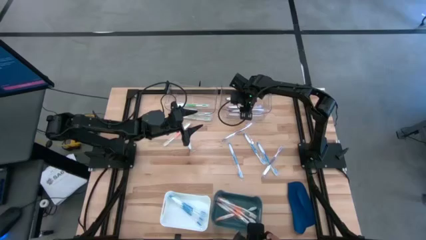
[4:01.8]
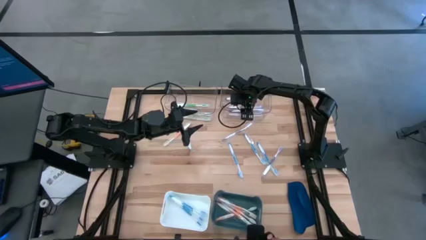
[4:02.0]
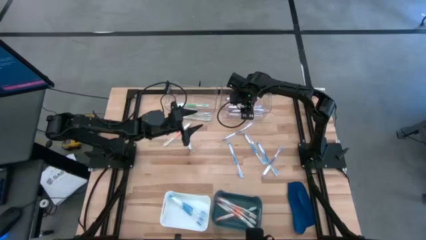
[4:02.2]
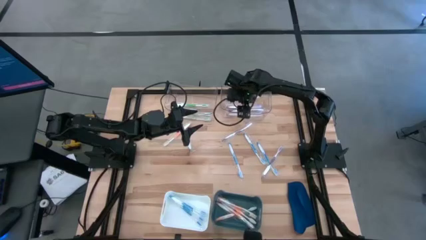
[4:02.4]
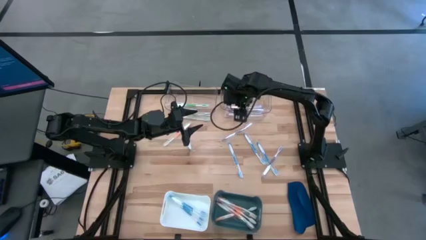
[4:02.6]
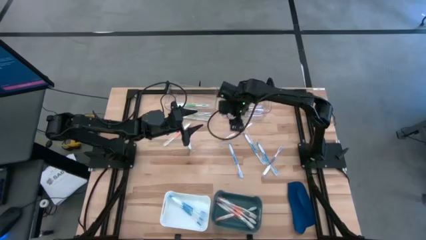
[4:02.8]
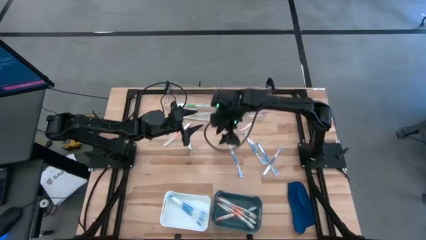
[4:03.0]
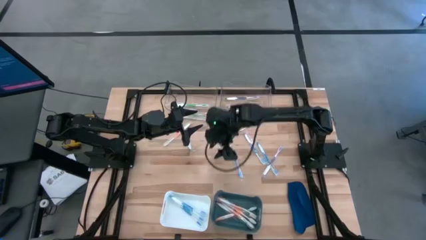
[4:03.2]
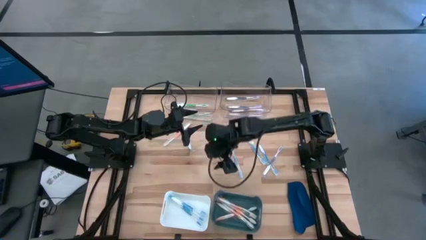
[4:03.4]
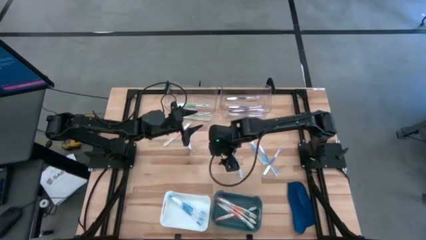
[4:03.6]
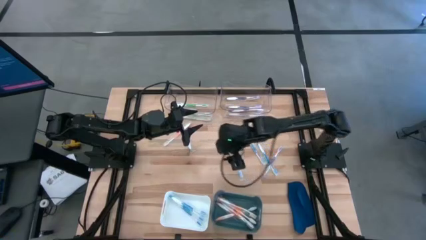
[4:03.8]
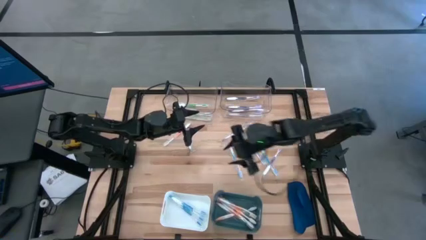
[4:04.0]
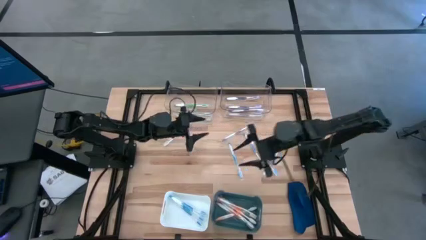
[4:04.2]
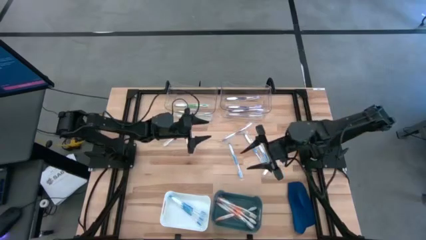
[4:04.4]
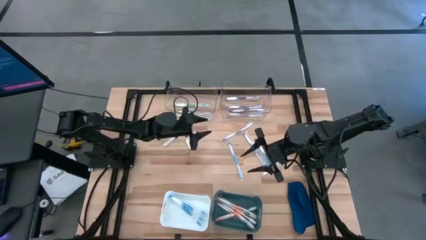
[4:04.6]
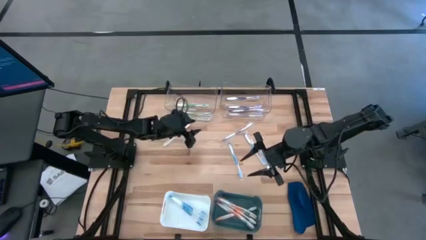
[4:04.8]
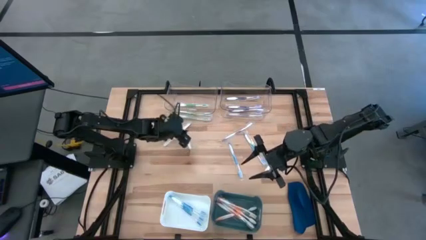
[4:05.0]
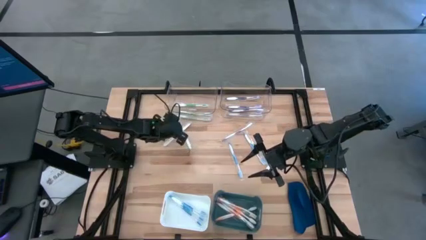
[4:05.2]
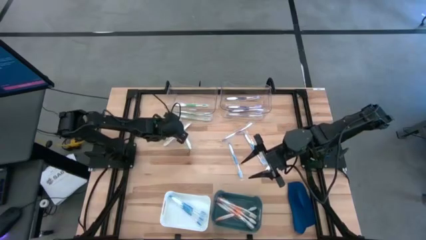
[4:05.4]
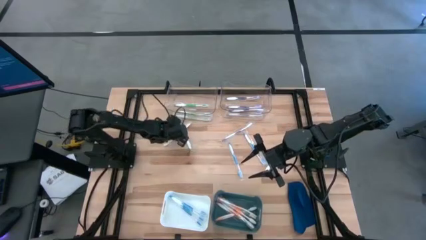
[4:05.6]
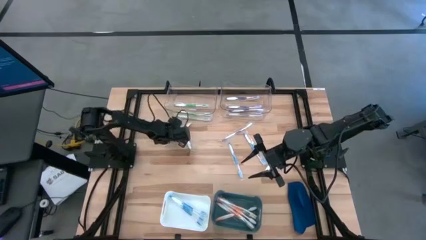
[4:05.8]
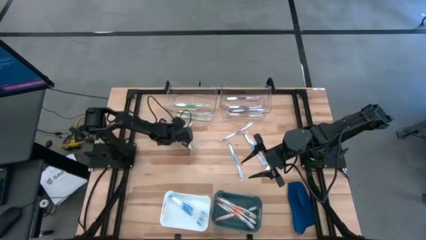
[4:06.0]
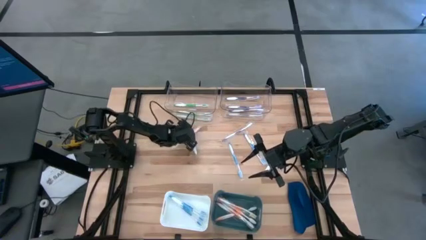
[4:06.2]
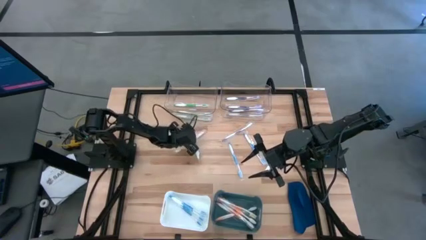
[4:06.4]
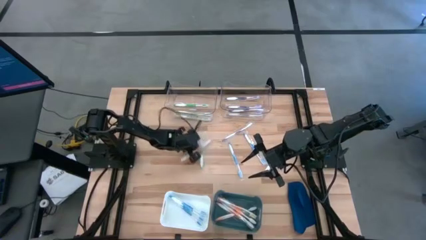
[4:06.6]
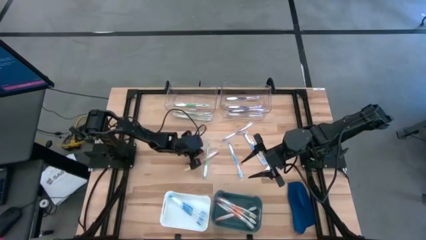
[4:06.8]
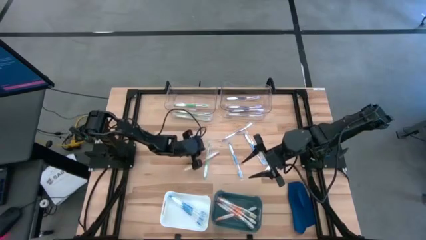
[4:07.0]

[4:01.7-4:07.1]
Task: Pick & Place Toothbrushes
Adjust the colored toothbrushes

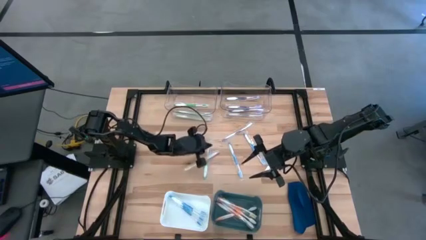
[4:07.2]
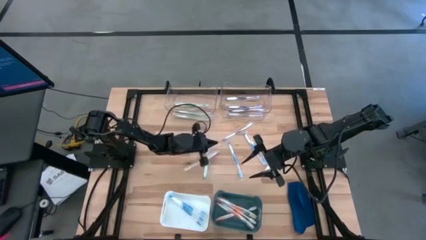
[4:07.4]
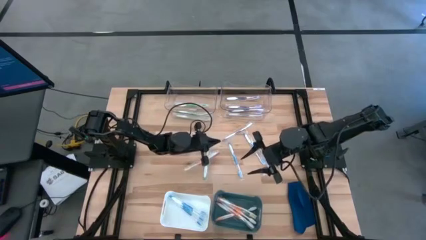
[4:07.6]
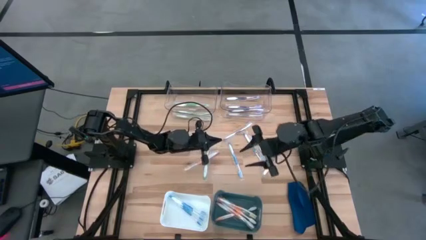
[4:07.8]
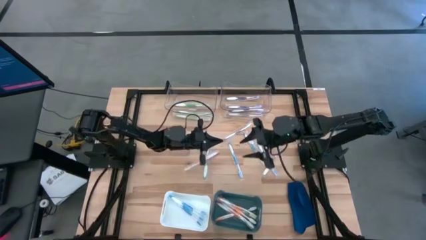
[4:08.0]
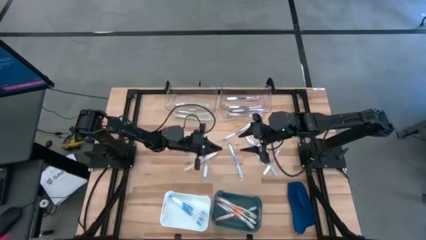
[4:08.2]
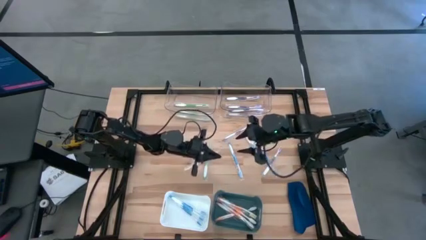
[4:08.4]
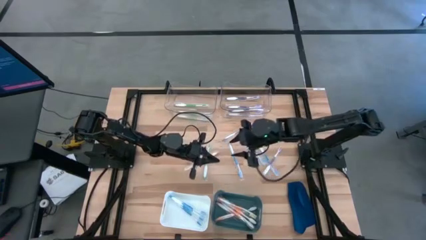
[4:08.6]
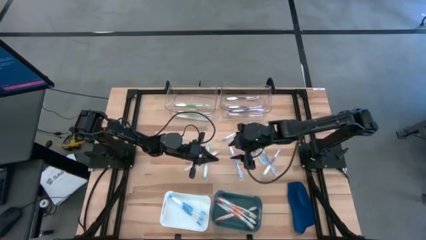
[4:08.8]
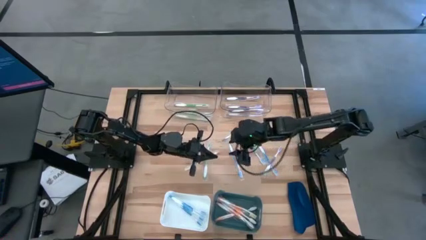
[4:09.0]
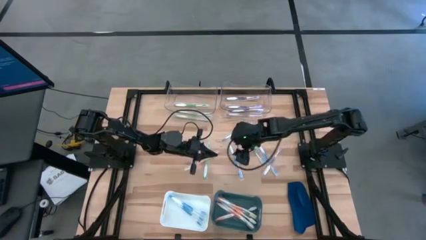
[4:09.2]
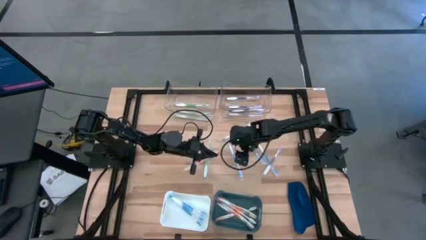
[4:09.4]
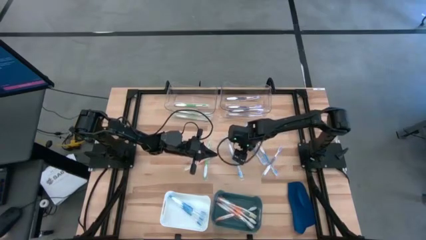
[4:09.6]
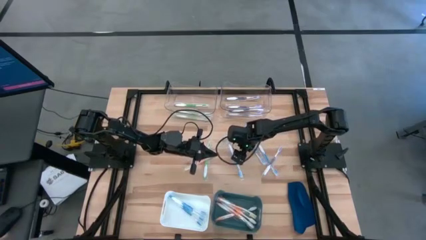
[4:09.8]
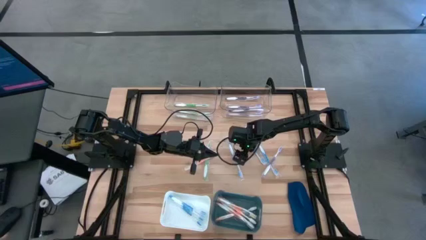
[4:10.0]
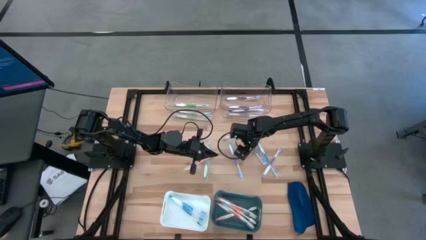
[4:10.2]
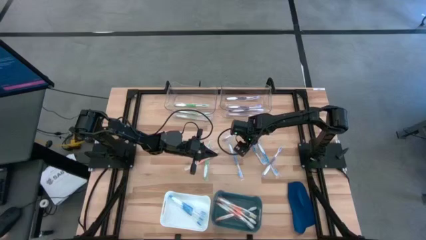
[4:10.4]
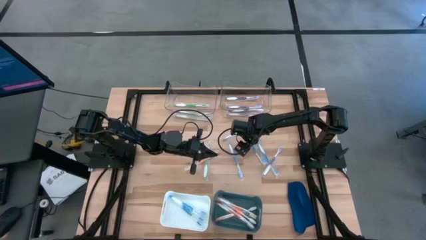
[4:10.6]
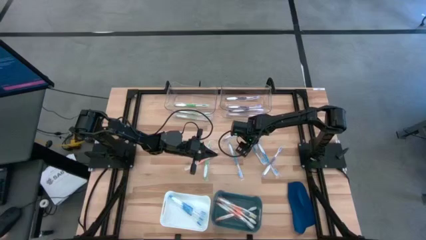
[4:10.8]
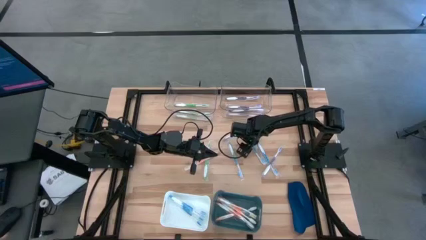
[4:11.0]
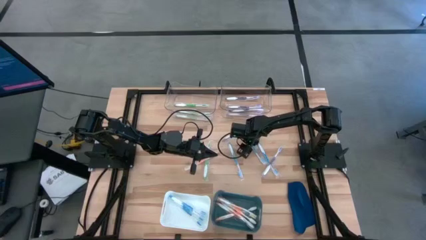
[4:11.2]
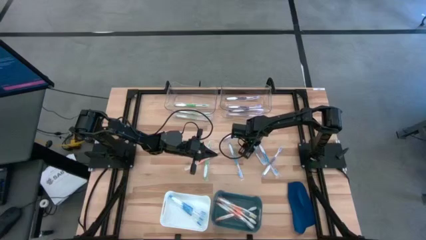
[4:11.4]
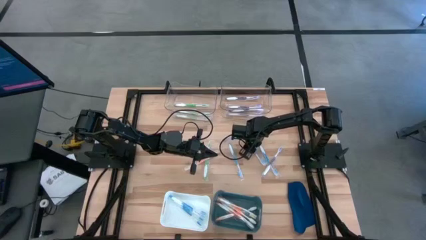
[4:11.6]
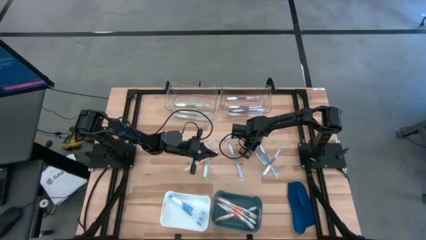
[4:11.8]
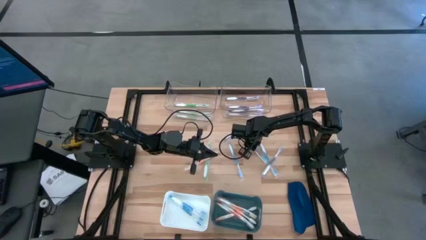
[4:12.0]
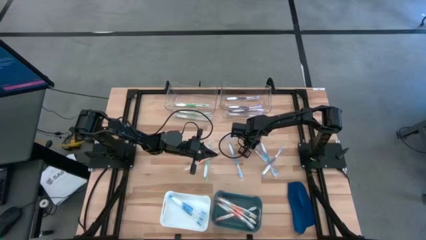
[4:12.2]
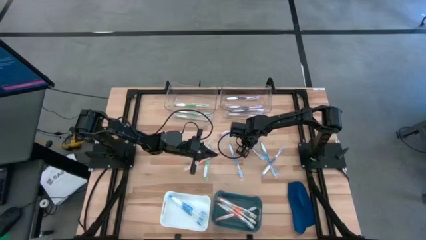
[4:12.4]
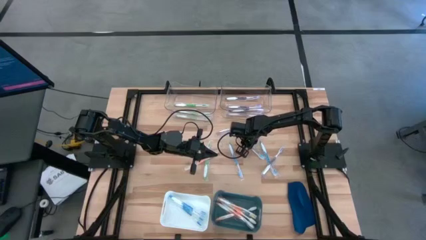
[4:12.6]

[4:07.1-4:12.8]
Put the blue toothbrush into the white bin

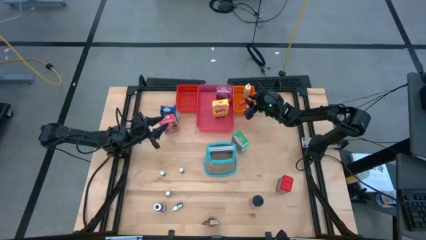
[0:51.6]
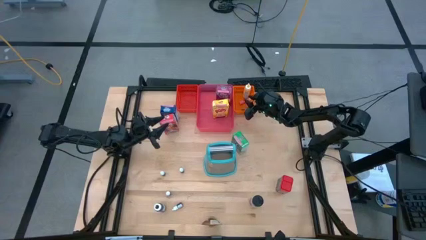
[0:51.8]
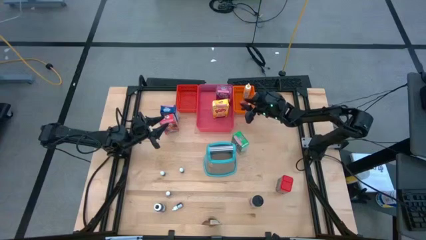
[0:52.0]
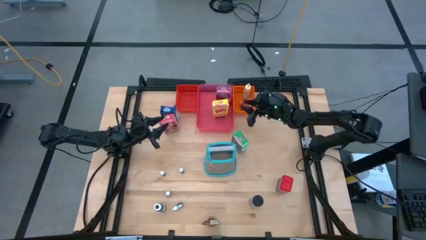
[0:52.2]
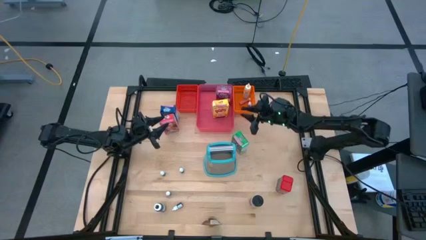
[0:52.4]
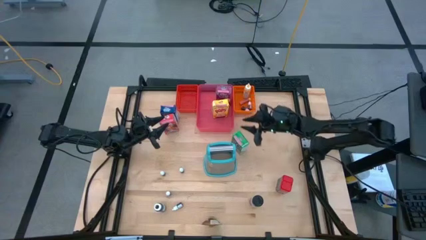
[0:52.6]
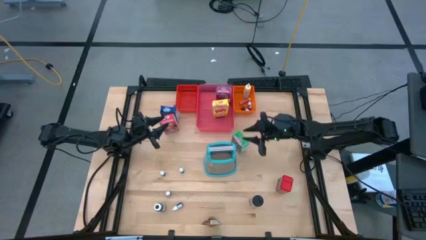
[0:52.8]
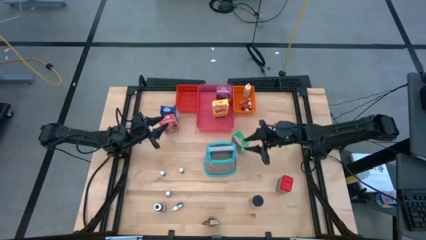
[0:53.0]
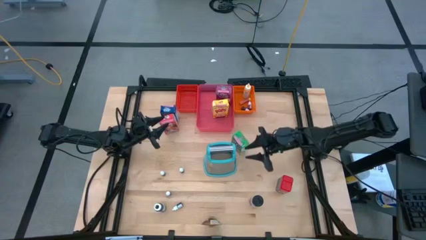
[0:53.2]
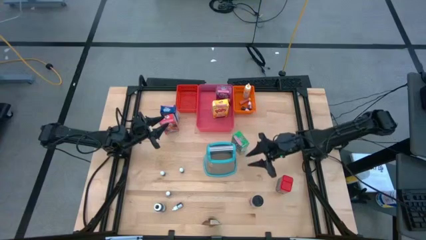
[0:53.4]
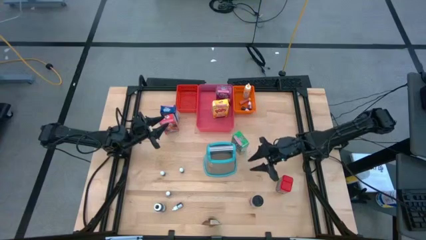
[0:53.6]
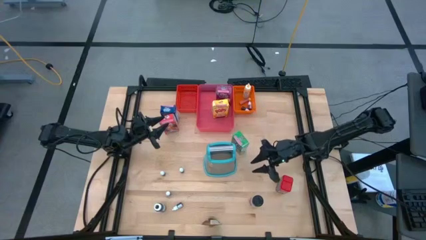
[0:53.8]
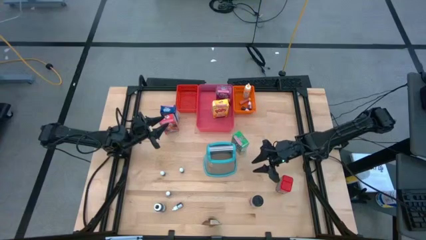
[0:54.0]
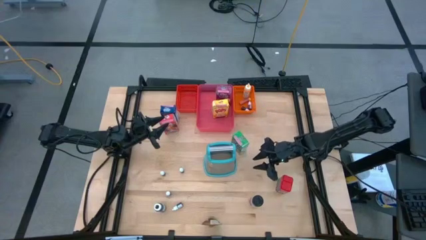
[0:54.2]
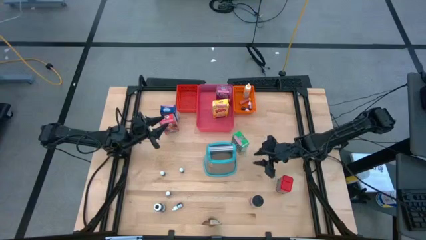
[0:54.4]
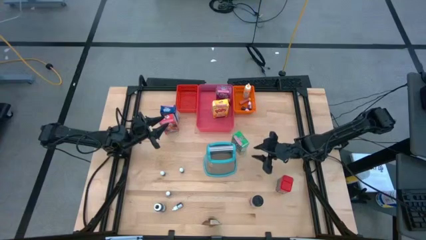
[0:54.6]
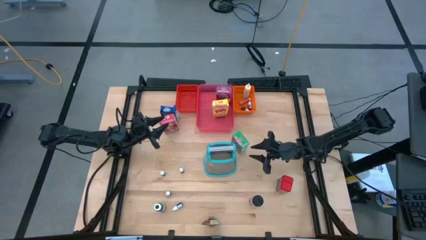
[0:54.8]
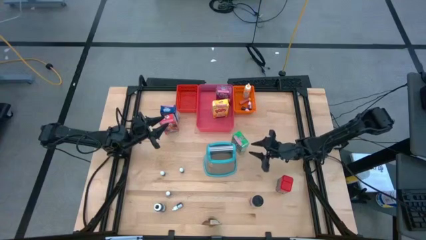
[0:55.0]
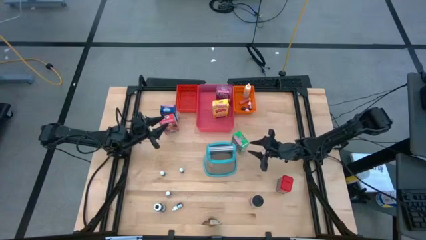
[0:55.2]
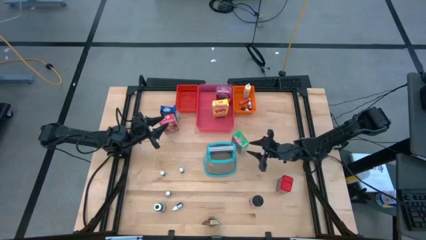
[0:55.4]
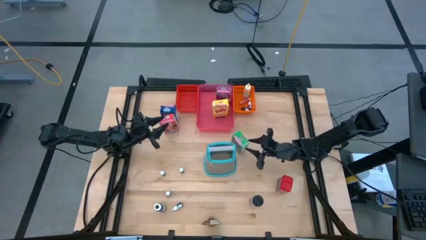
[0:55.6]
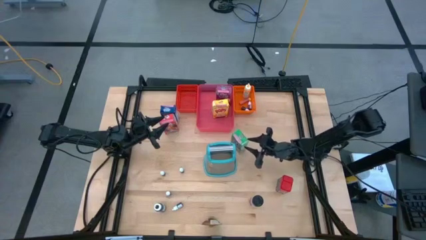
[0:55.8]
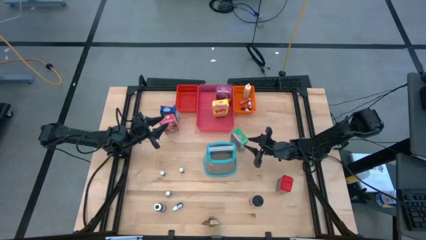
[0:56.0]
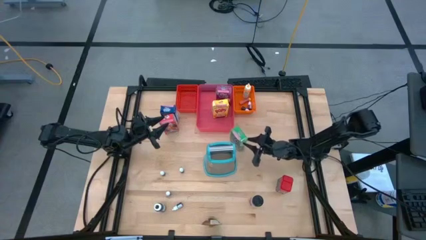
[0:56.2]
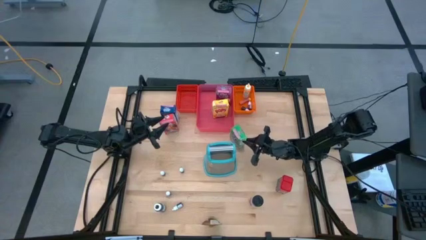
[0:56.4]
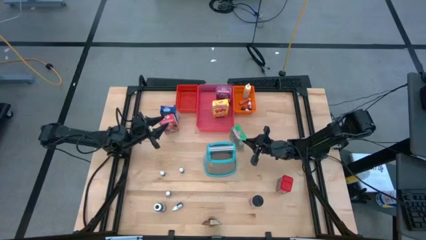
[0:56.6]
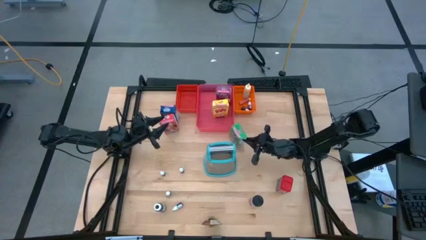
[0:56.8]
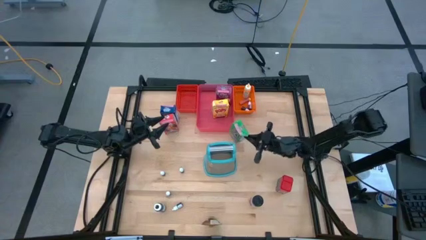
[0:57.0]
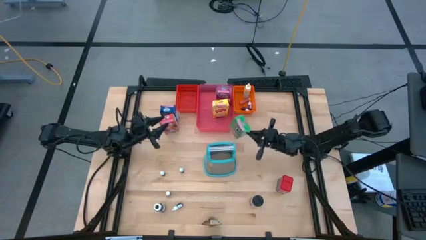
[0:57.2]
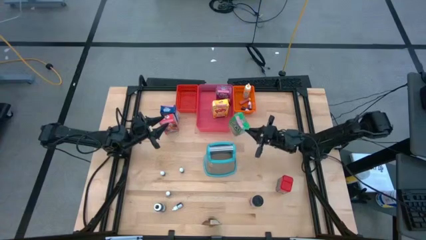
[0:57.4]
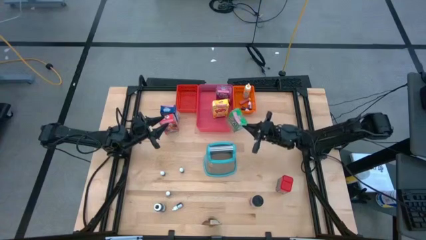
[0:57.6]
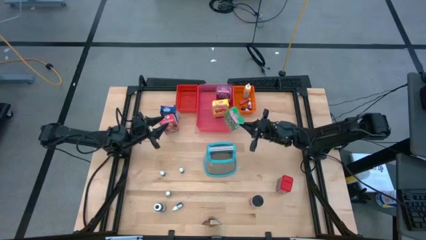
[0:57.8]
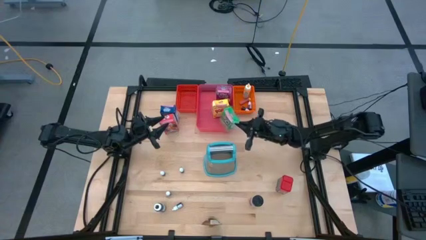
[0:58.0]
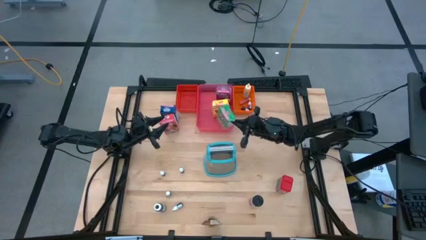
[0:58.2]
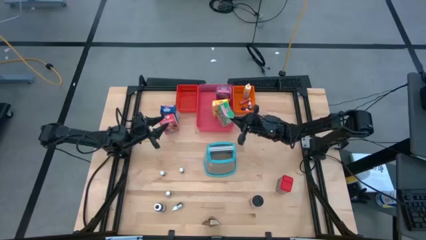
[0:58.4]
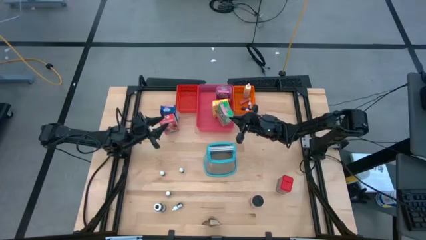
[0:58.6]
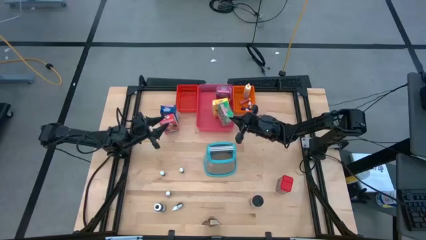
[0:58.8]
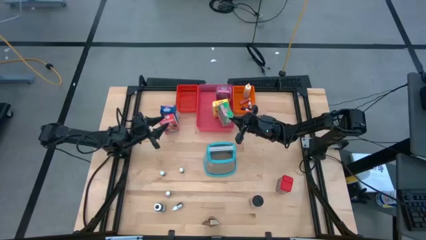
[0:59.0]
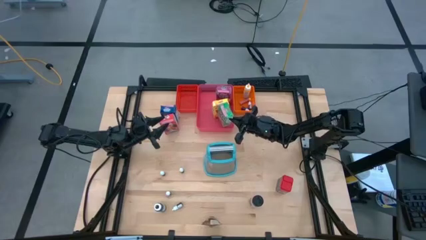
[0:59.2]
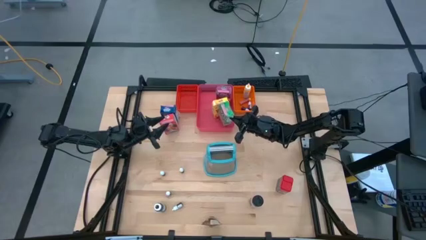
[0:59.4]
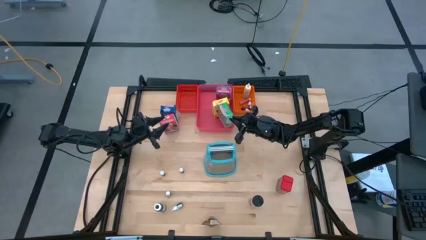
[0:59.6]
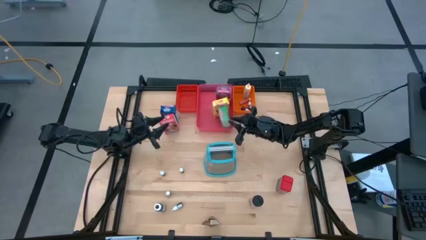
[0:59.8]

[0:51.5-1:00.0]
Task: Pick & Place Kitchen Items
Put the green cereal box into the pink bin
